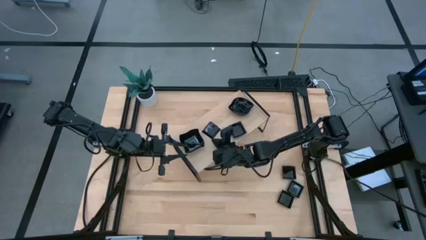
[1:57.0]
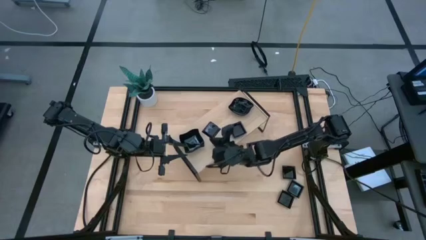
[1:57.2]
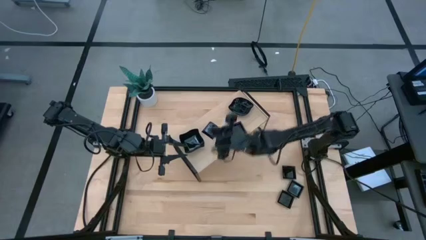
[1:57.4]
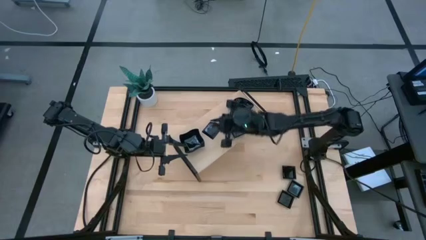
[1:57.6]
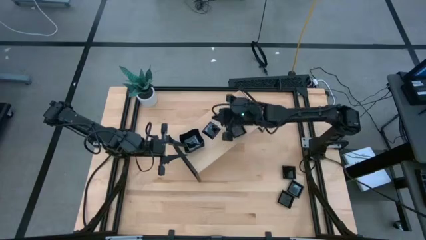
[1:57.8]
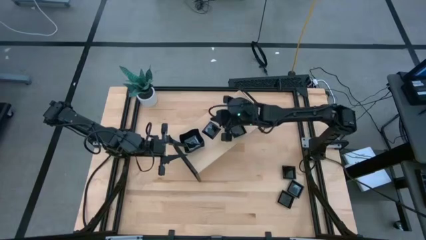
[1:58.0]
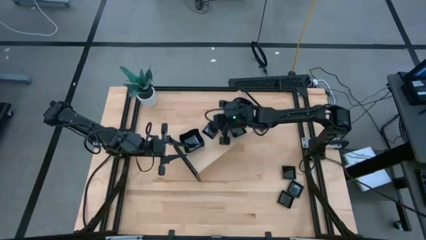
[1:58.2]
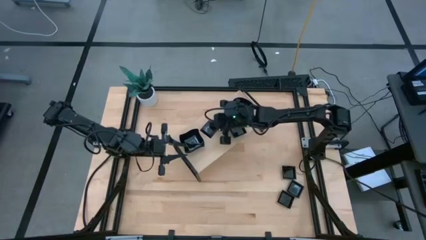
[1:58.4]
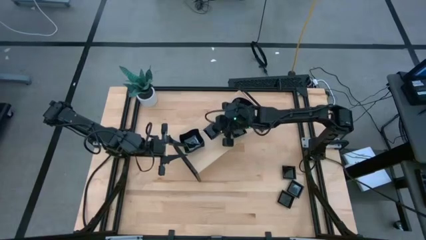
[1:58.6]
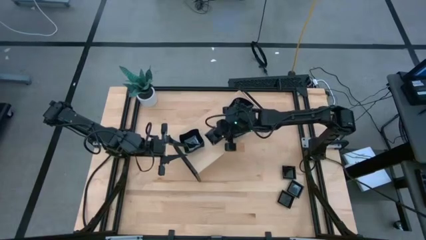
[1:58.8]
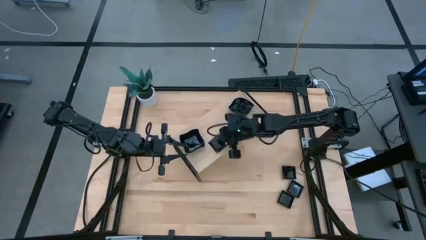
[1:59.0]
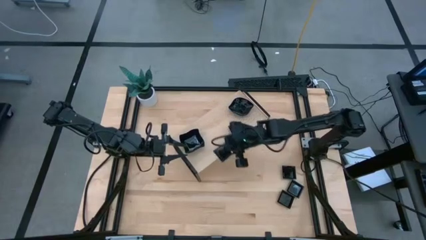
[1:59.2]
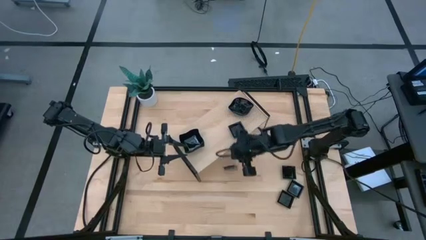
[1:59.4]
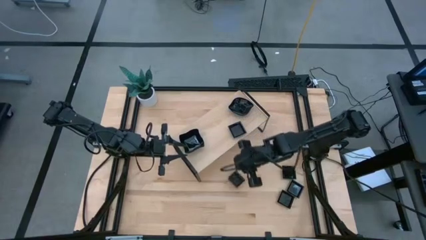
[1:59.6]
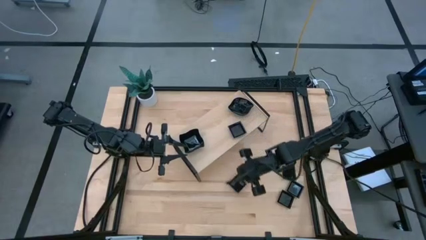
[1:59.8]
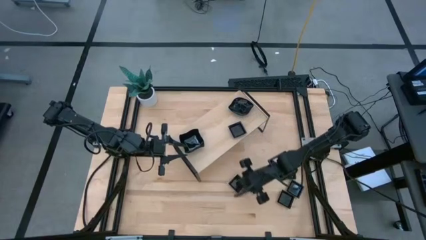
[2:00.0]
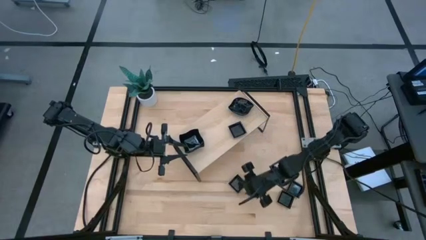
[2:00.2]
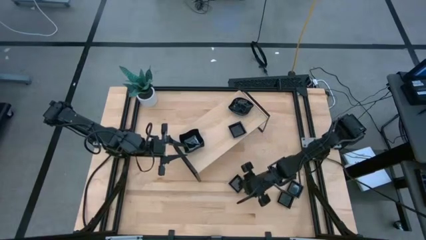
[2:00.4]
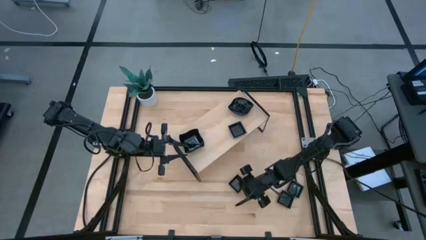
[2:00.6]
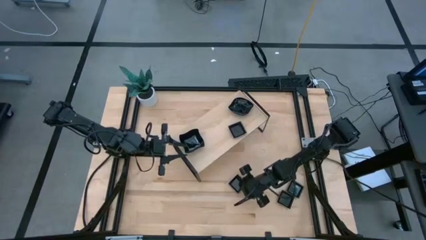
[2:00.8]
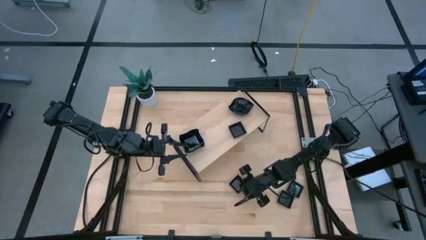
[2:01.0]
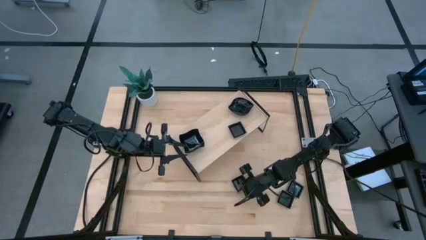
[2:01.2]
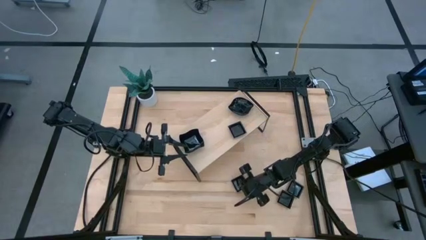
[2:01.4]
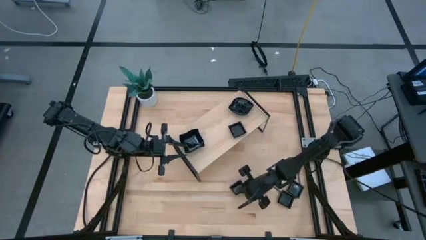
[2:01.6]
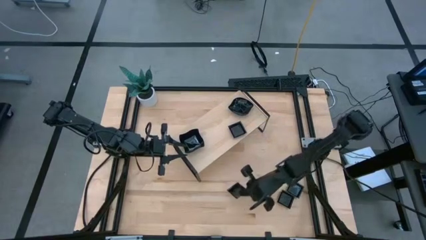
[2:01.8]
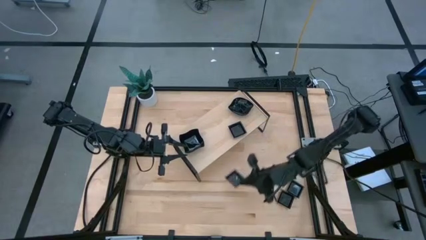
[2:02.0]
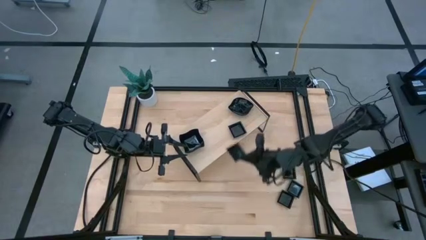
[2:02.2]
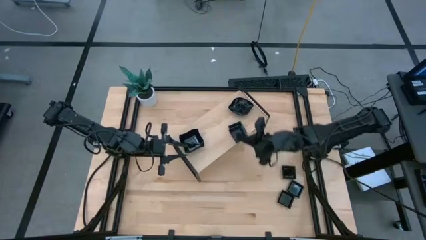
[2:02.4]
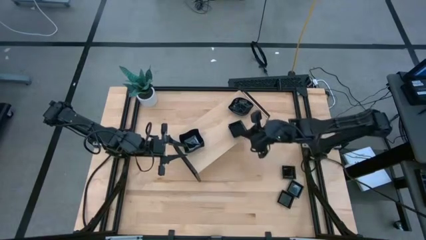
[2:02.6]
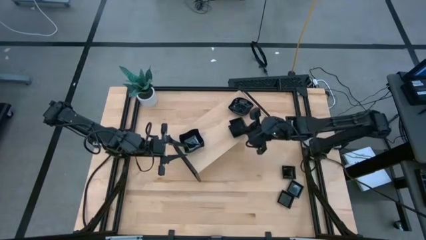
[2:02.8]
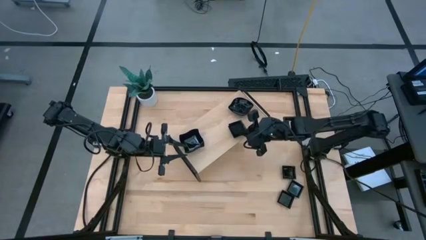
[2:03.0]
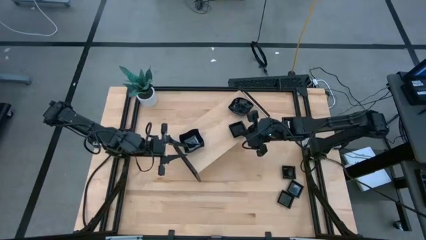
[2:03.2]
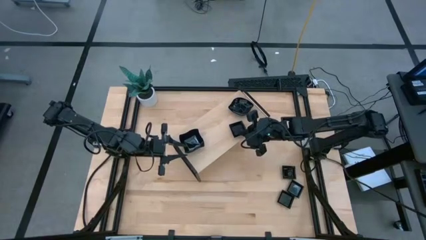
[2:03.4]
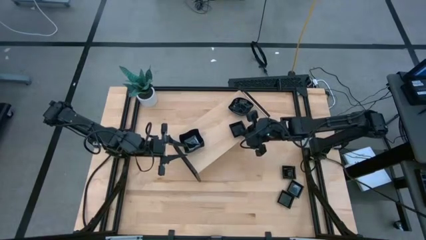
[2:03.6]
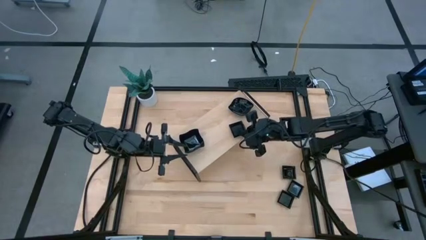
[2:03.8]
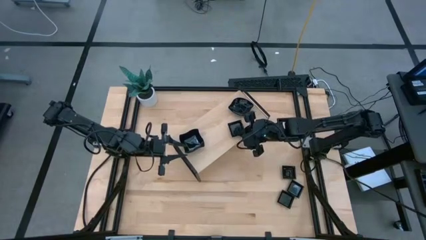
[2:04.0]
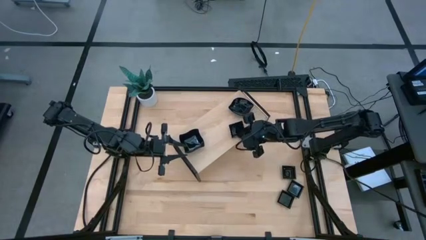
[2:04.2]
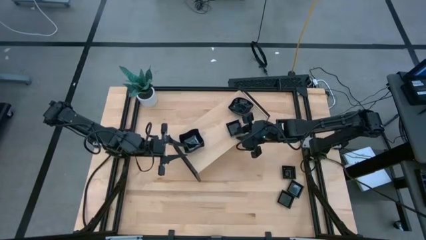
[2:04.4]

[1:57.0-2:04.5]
Task: Pick & Place Mini shaped plates
Stack the square plate on top of the other square plate

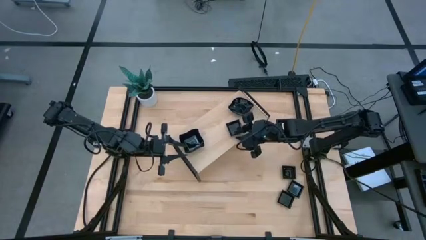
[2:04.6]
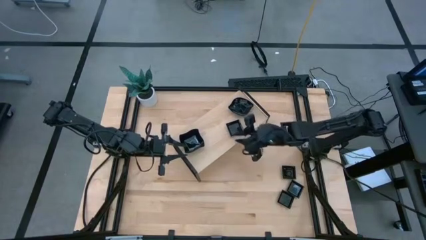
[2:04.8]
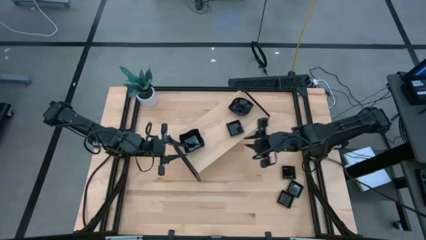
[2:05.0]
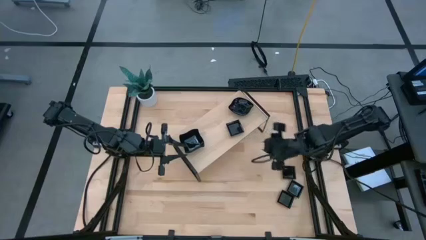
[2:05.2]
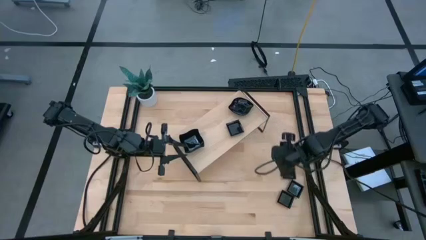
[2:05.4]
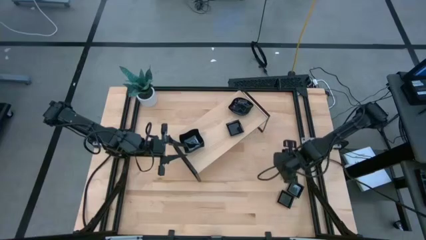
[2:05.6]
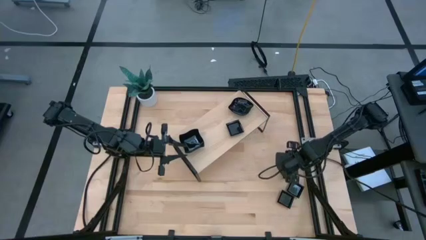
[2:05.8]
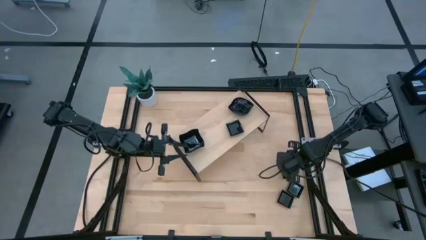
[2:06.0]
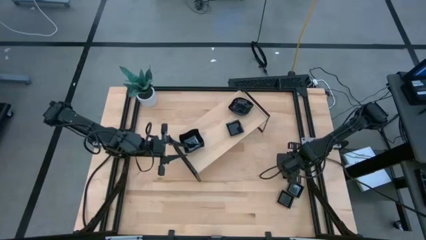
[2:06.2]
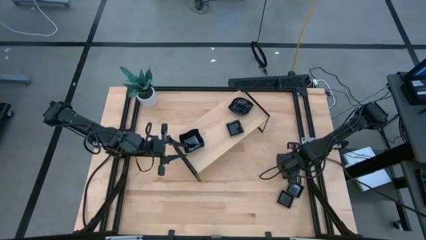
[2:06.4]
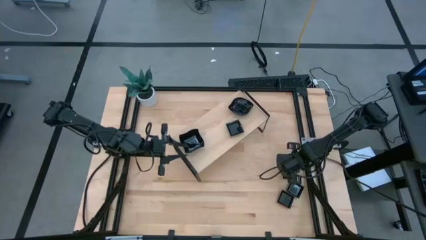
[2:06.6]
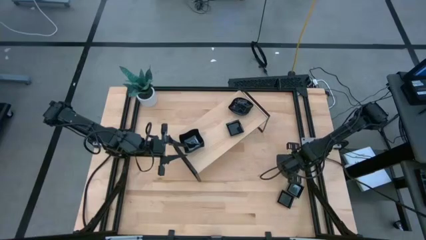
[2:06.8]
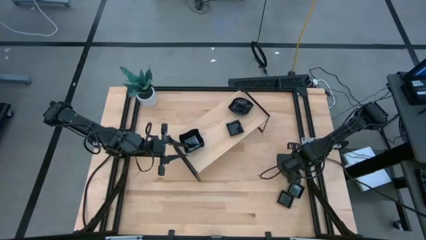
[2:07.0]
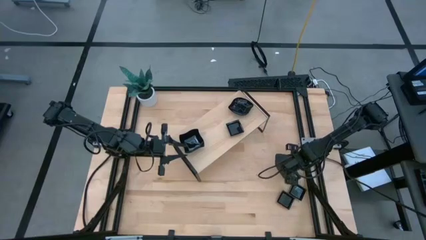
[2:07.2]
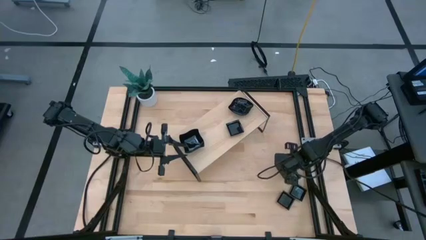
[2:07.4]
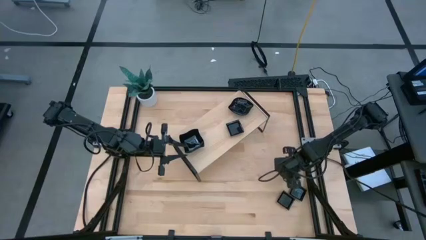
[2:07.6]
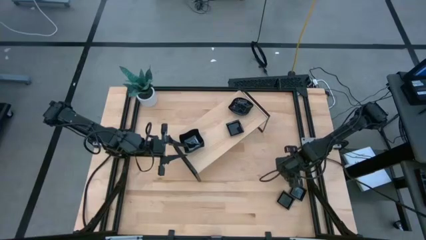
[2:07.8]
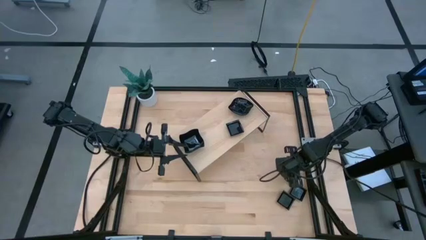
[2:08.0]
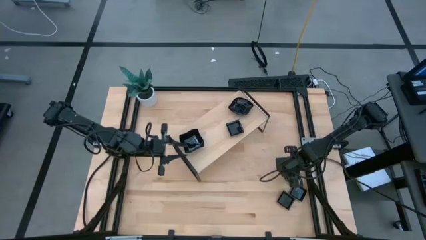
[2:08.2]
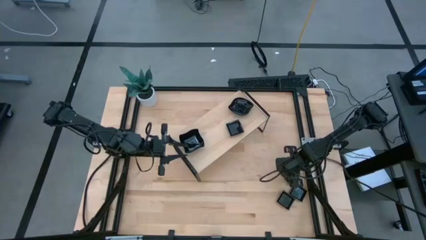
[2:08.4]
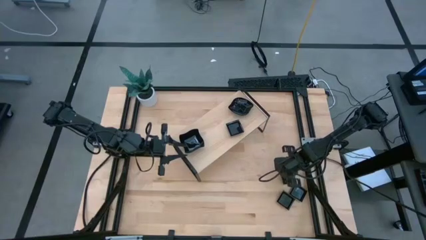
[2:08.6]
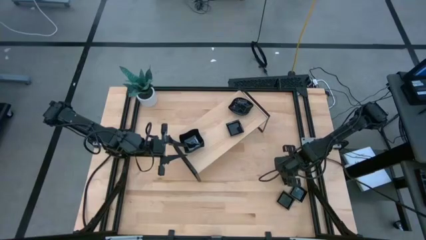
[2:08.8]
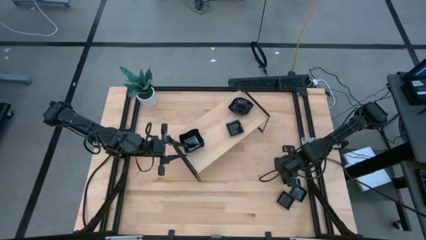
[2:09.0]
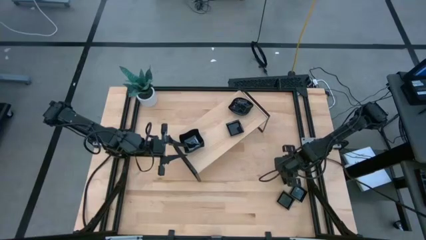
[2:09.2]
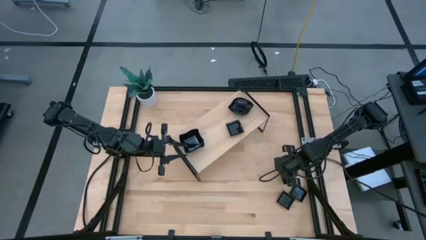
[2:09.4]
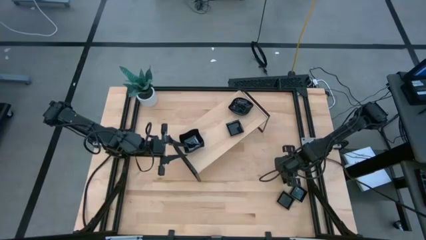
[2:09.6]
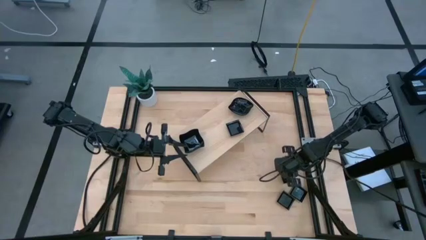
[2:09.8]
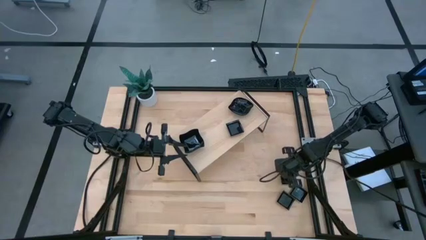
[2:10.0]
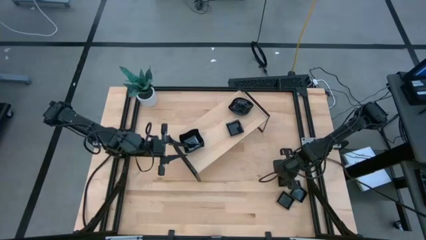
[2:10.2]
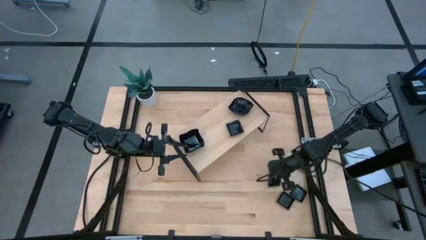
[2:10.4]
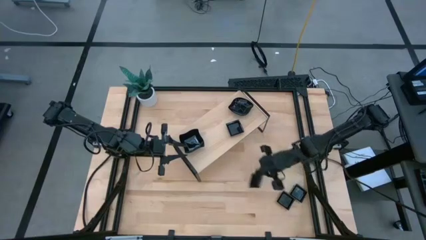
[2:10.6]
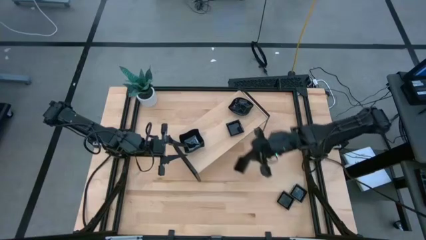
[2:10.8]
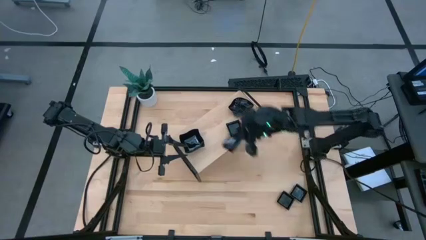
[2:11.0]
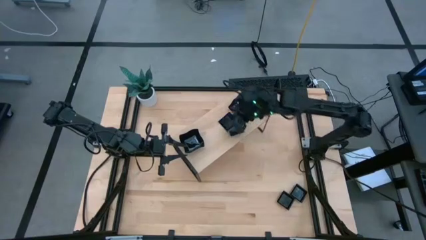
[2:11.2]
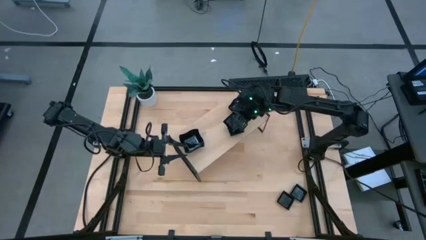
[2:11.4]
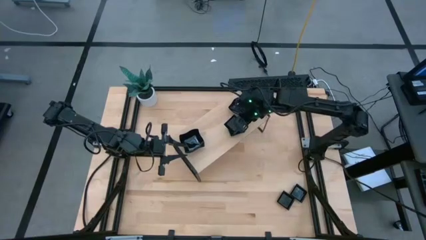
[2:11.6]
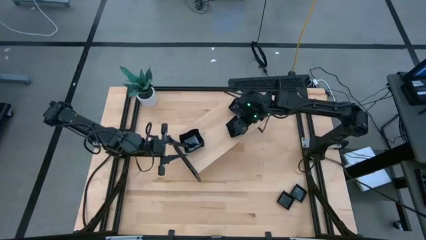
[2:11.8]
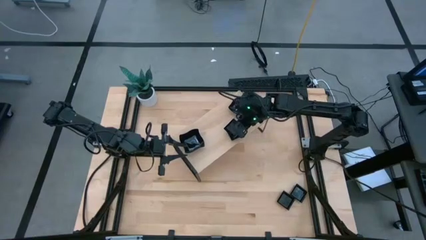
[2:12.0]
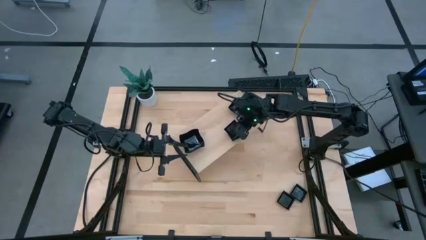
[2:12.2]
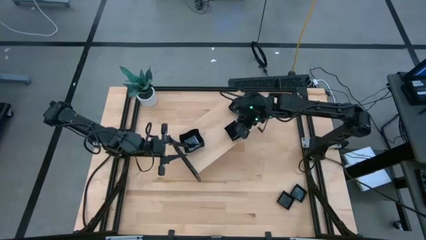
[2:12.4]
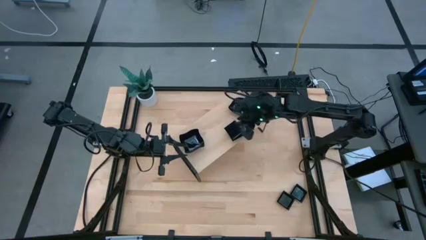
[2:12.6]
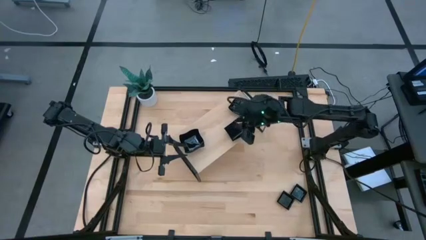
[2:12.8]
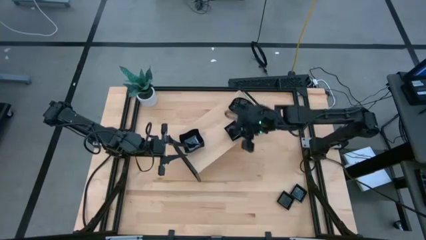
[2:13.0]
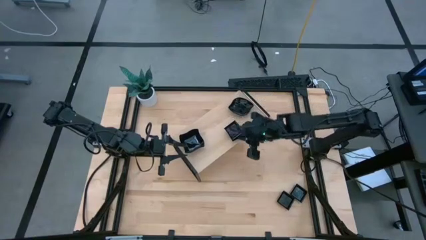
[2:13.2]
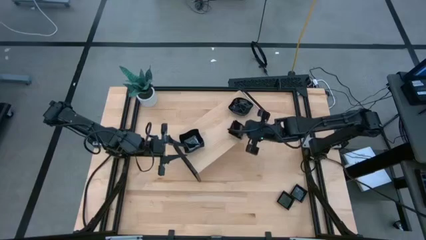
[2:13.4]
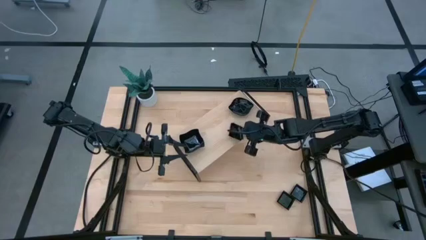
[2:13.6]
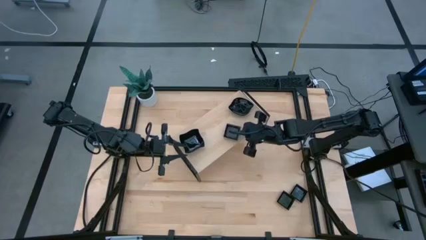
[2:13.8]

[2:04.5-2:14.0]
Stack the square plate on top of the other square plates on the shelf
